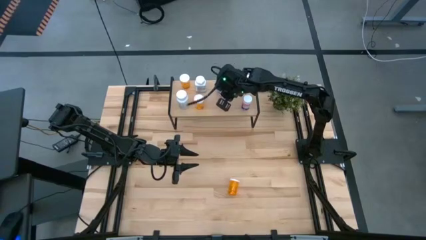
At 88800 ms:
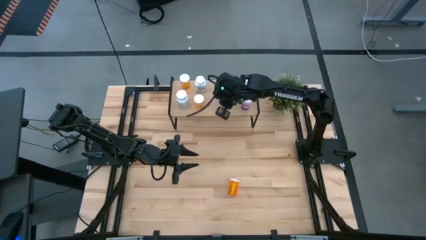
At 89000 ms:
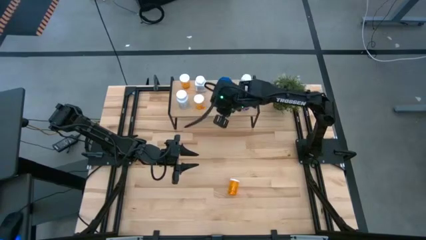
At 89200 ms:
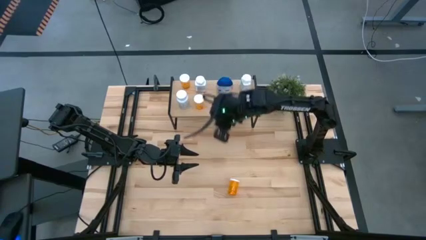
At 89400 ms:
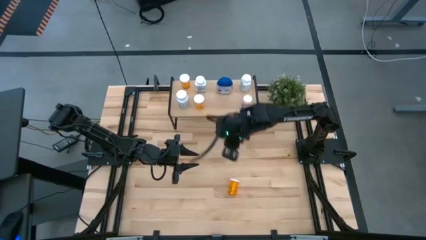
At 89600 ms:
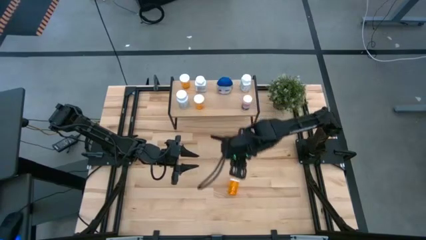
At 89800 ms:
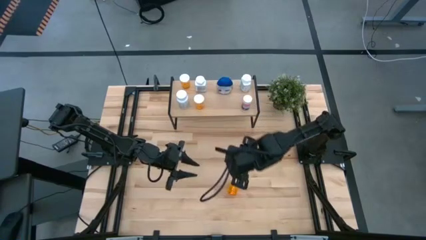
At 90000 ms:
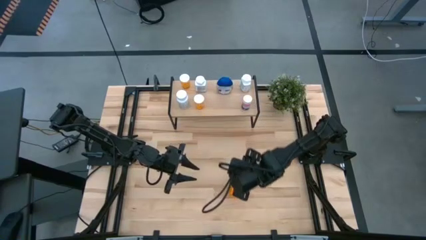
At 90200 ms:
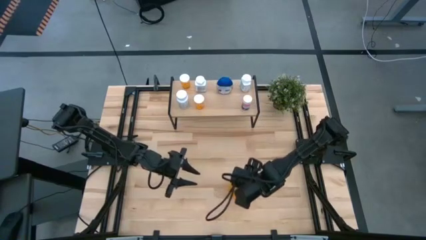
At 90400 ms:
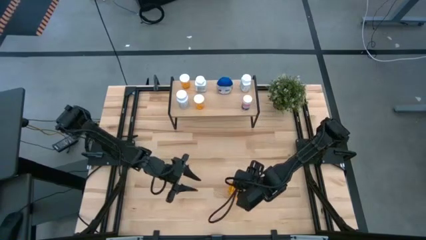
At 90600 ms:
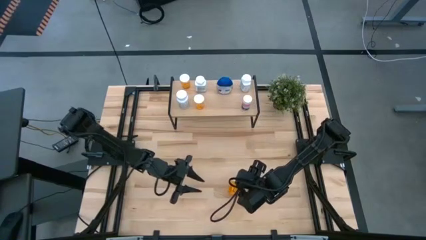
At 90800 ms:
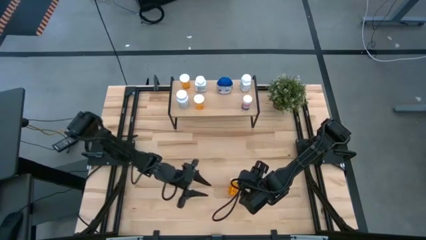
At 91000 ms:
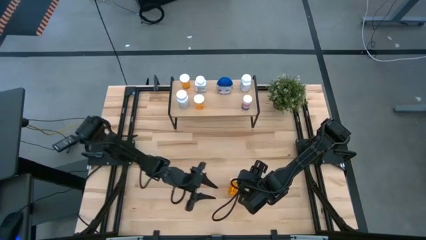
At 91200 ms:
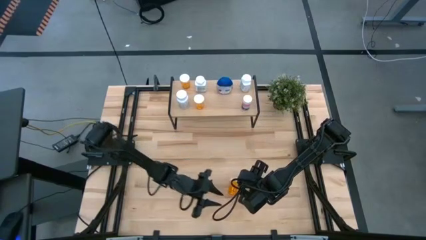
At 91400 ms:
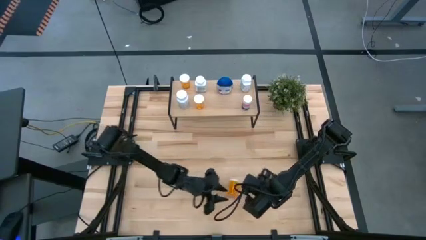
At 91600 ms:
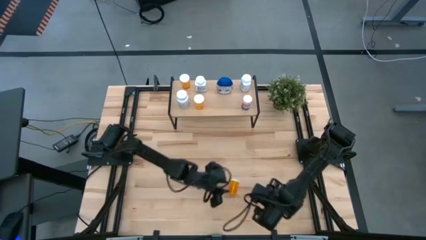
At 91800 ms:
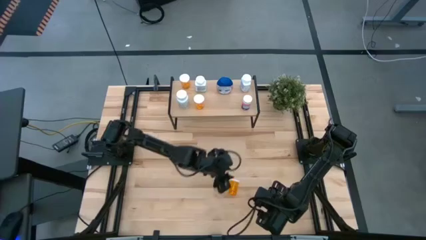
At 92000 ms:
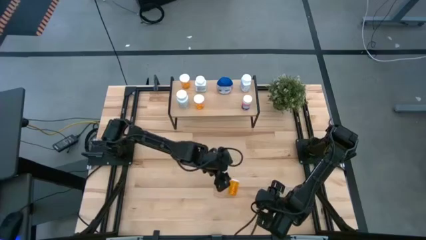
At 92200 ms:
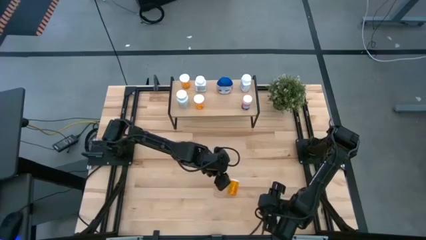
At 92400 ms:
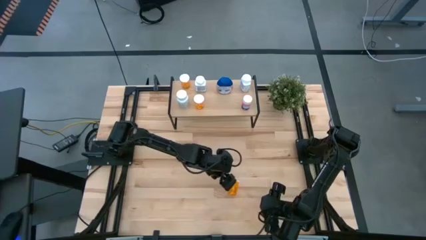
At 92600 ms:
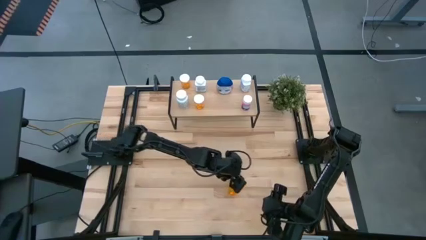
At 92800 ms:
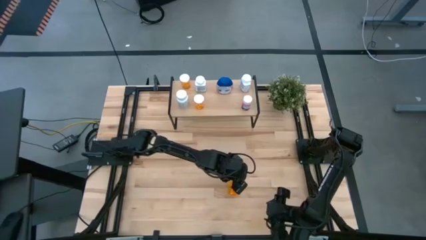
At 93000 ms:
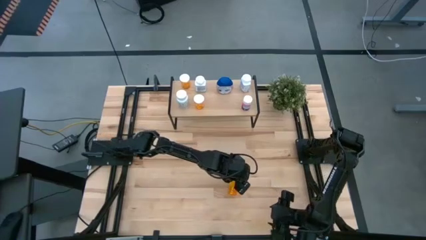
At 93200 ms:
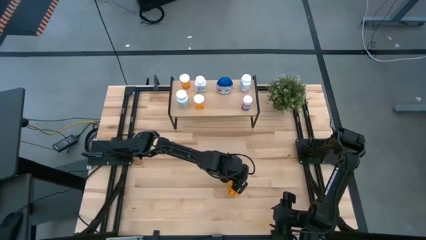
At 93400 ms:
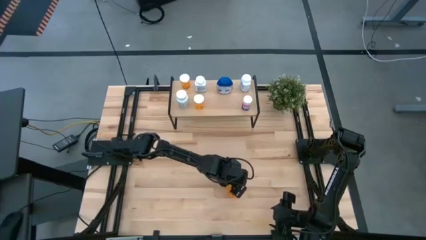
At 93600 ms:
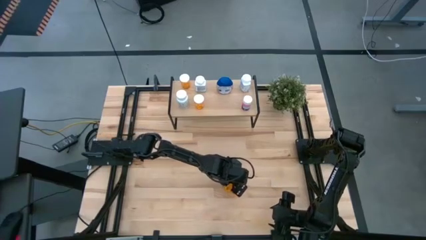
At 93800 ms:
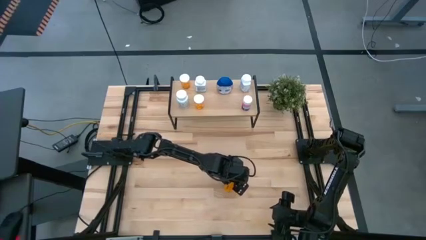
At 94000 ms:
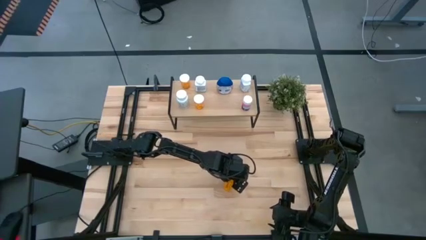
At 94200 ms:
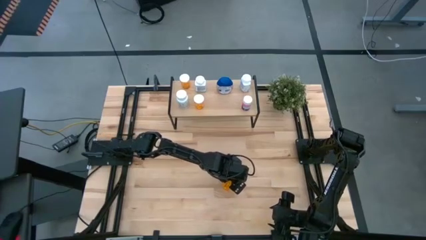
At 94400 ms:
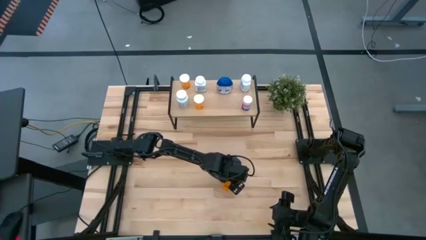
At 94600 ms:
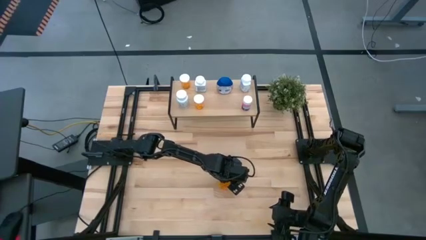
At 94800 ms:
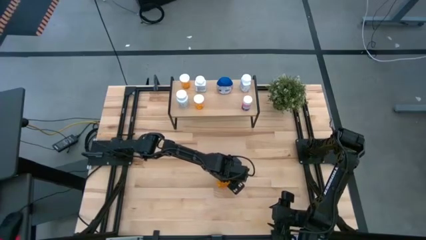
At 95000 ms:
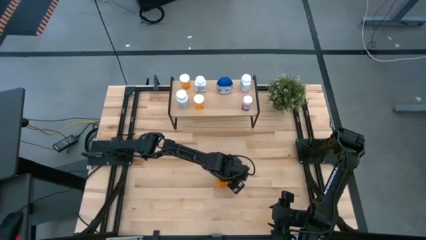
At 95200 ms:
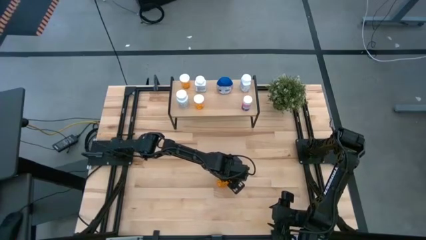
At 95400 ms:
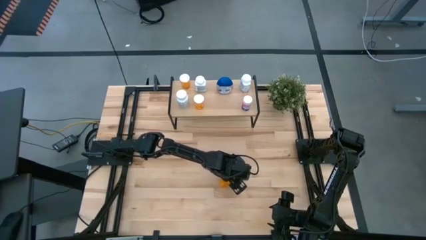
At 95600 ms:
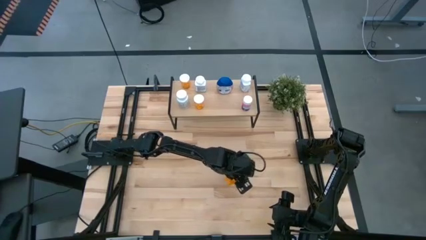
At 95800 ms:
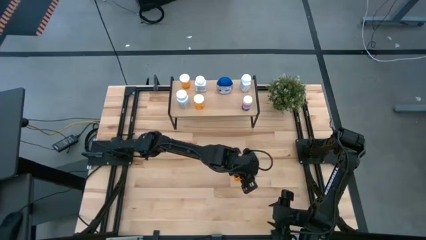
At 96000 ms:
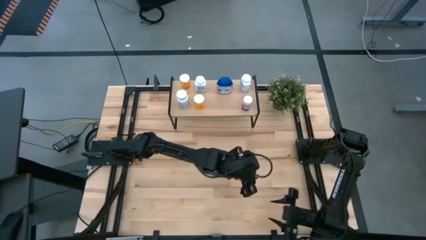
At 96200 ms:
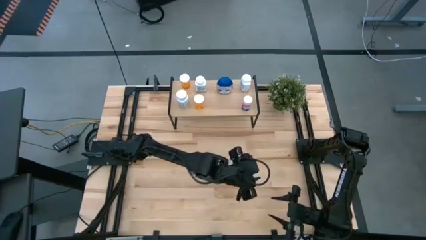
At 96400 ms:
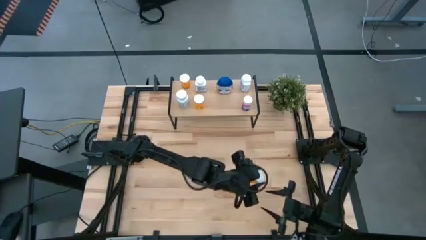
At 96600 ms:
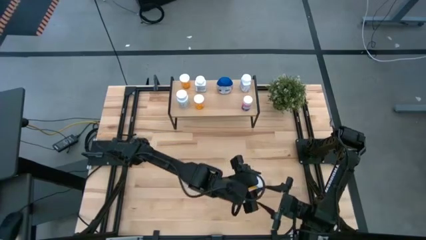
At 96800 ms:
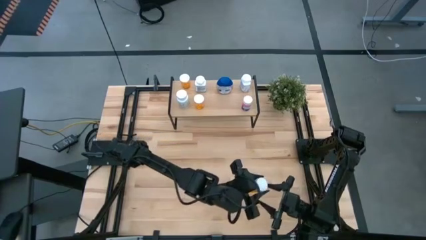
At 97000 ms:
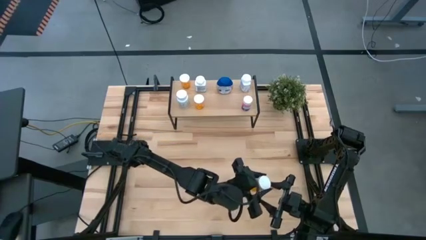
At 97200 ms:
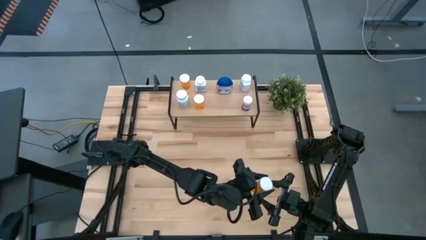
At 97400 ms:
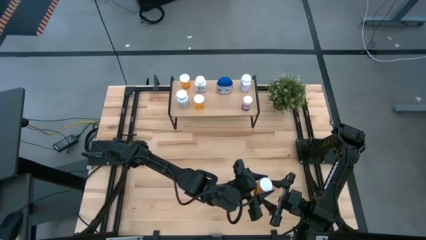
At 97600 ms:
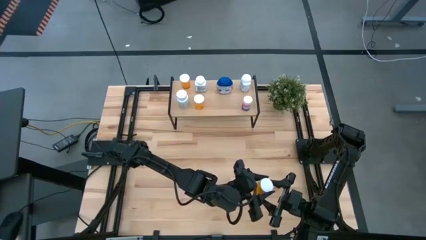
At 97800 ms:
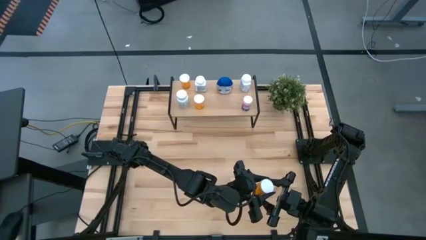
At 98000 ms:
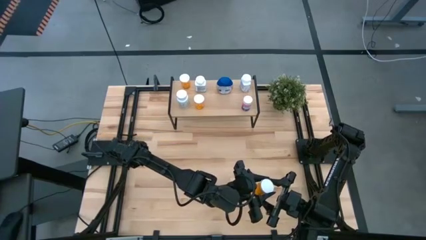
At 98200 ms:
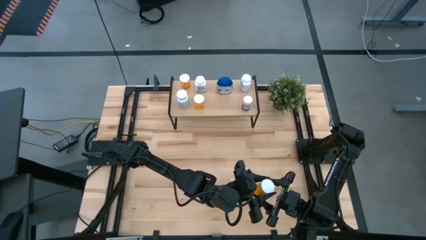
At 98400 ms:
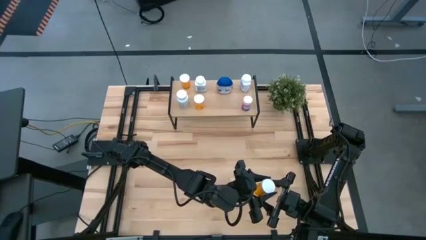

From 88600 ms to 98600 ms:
Task: Pick and place medicine bottles onto shelf by color
Put the yellow pill bottle on the shelf

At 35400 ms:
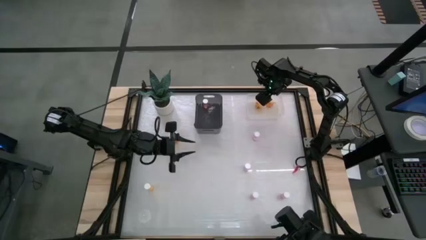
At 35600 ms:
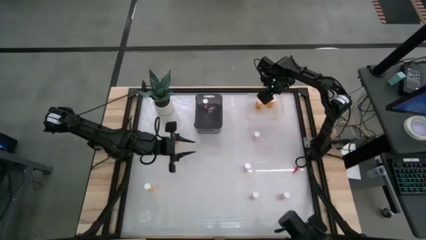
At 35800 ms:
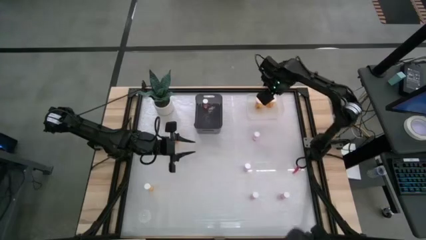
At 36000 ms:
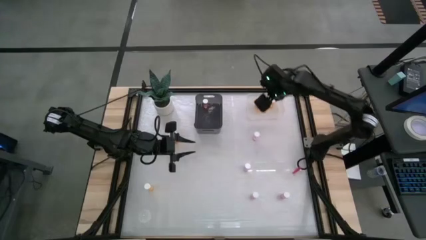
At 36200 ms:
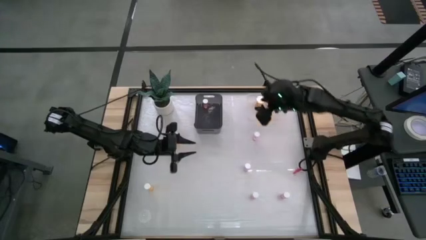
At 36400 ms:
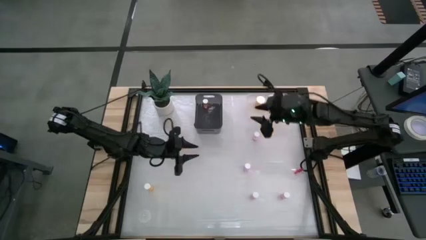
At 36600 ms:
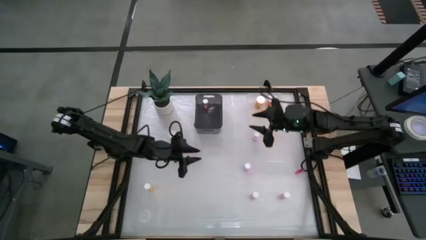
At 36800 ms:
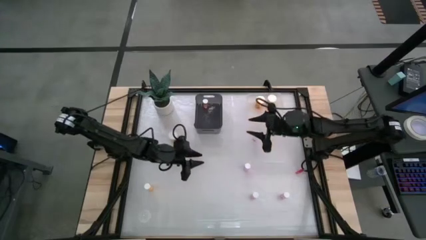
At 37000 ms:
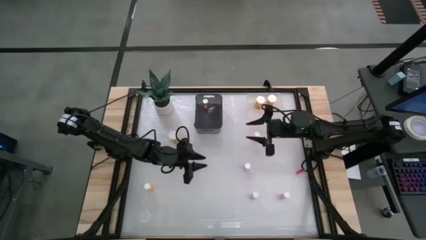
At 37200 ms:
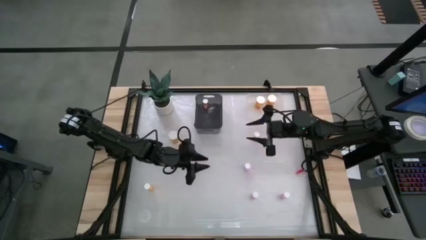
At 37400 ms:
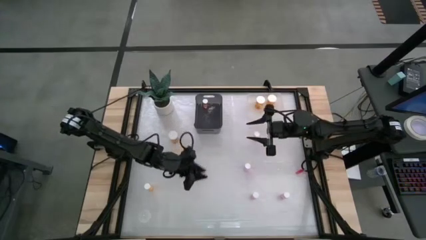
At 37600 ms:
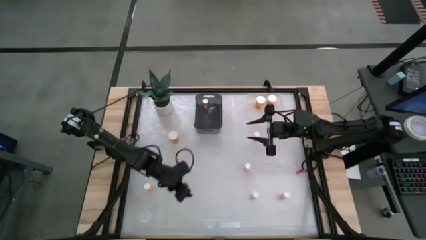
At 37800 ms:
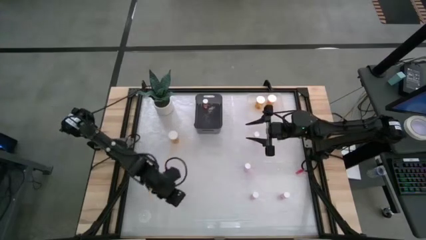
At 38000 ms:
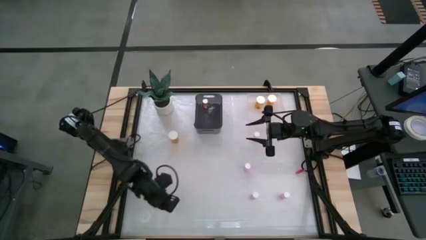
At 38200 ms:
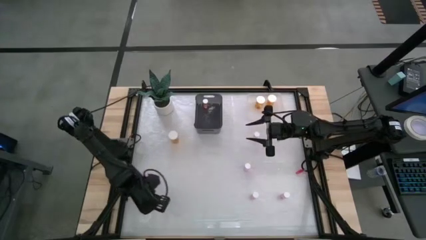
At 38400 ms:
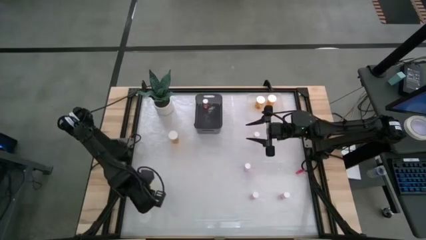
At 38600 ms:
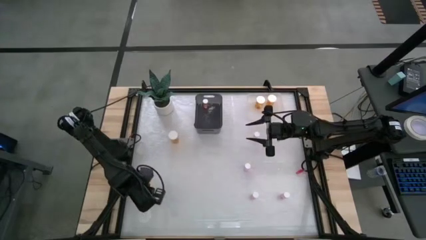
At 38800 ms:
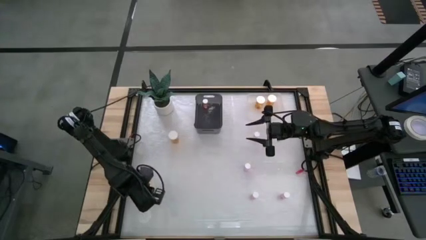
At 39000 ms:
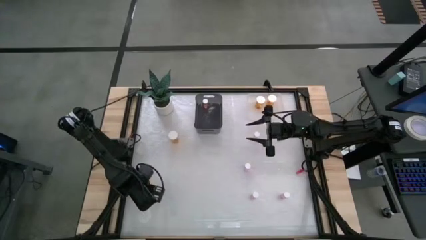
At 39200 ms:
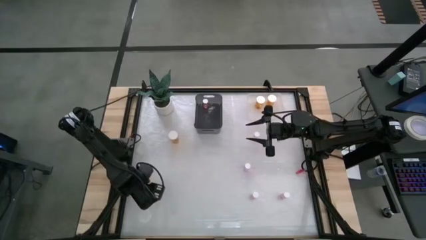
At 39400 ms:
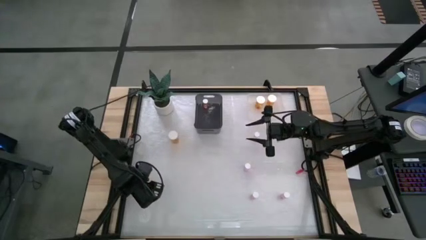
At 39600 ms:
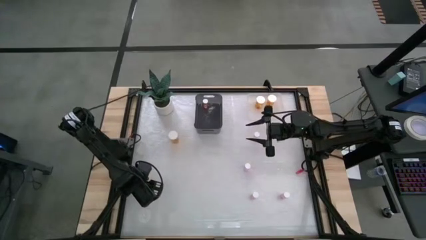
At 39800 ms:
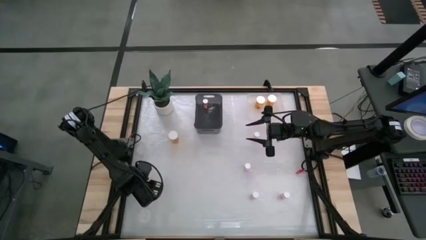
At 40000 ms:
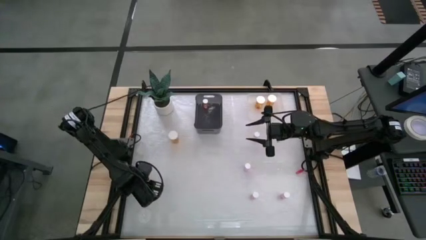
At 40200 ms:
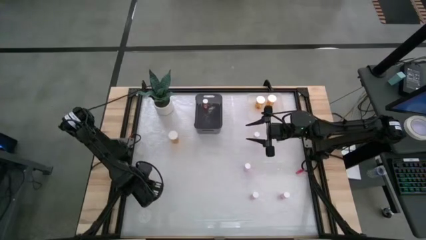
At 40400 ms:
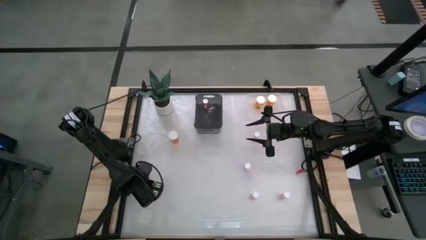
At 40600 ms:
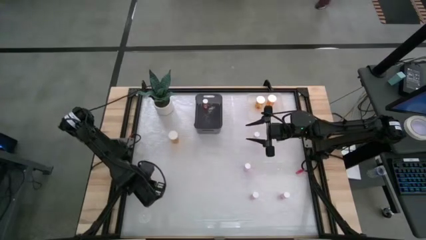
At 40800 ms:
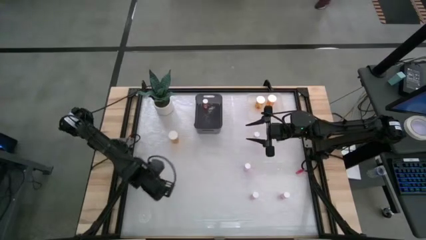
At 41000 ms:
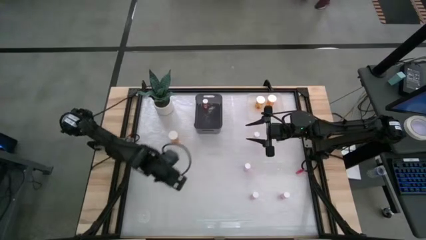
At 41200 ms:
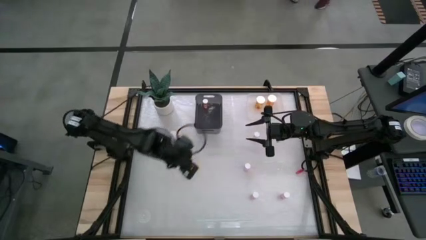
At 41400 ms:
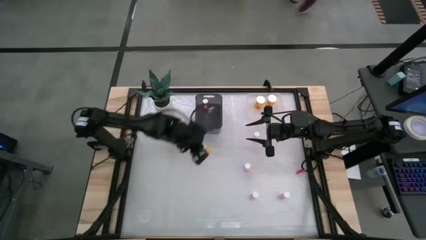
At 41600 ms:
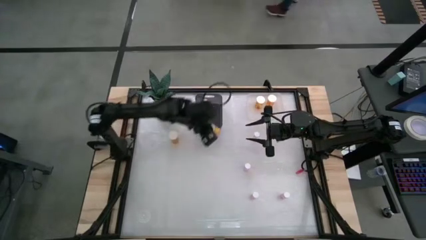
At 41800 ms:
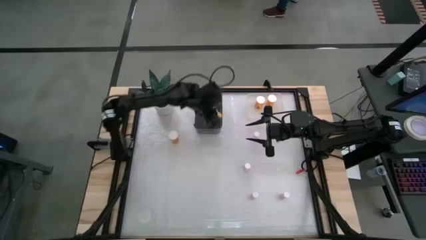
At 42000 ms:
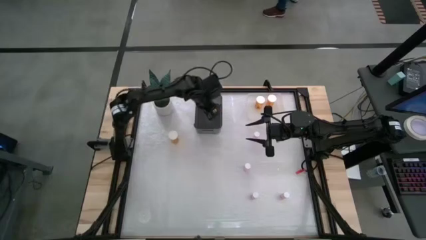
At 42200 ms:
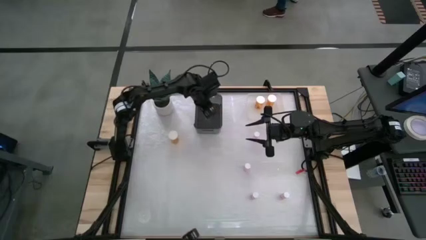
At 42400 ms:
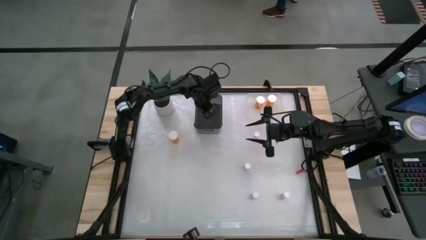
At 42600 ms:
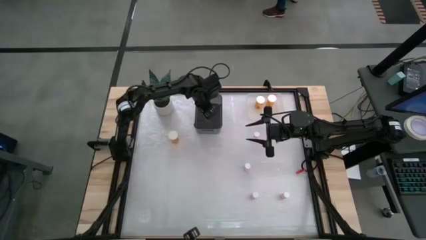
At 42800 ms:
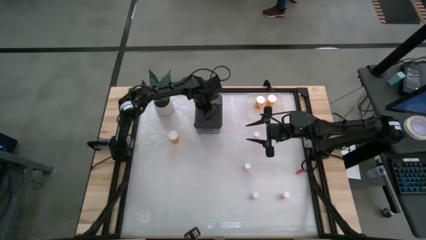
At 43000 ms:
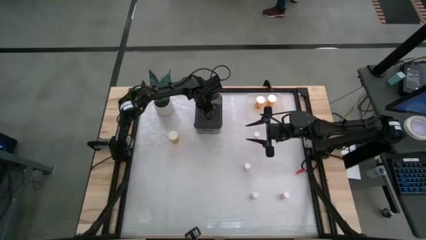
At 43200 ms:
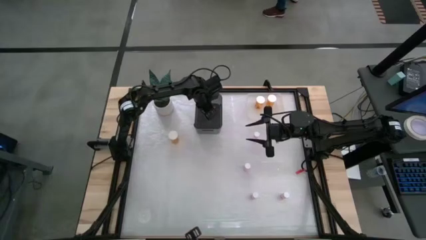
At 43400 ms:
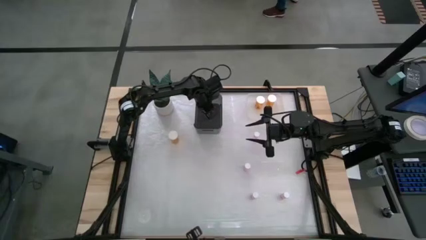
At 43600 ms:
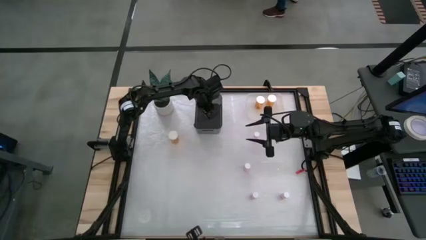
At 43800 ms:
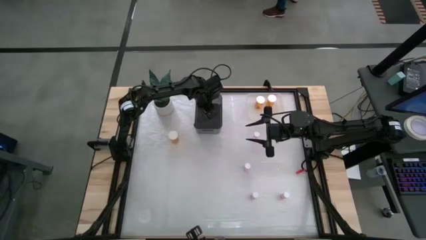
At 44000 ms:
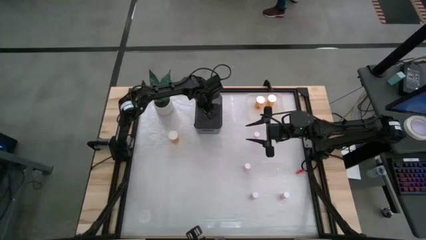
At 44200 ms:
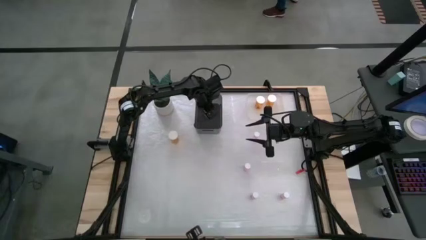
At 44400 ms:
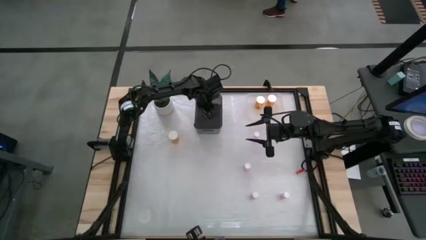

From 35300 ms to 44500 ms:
Task: Pick and place medicine bottles into bin by pill shape (circle, oval)
Put the small orange pill bottle into the black bin
